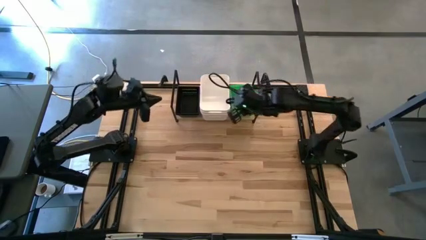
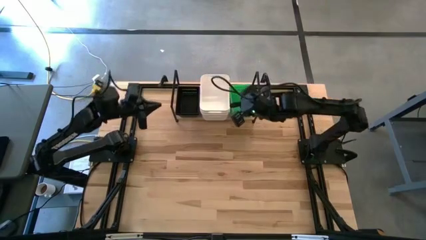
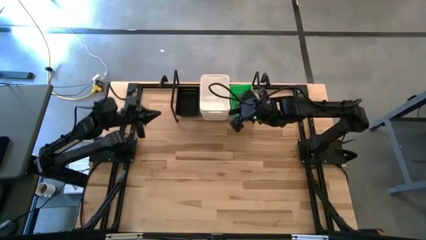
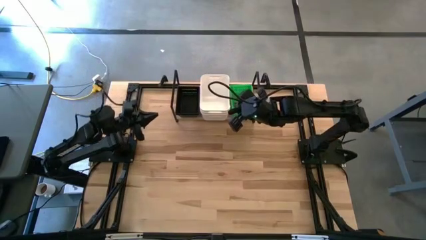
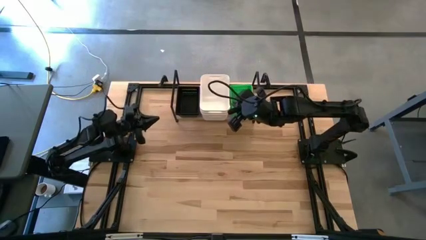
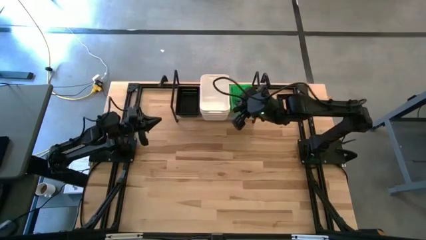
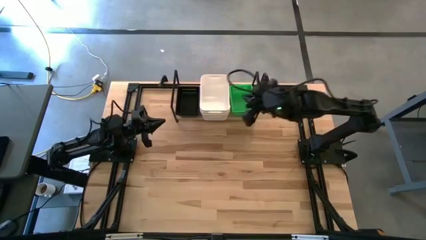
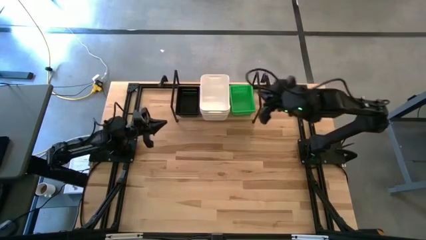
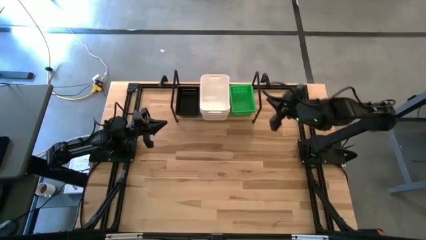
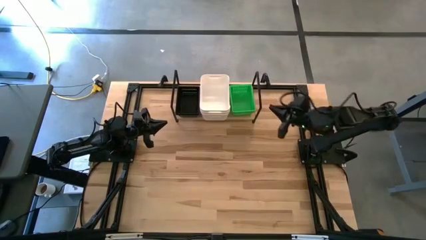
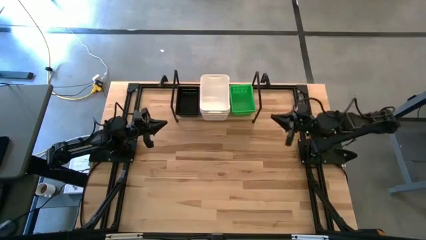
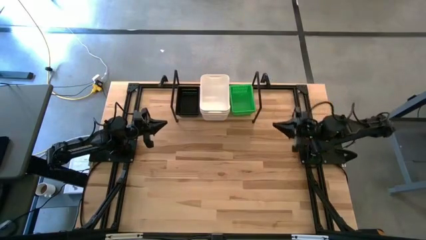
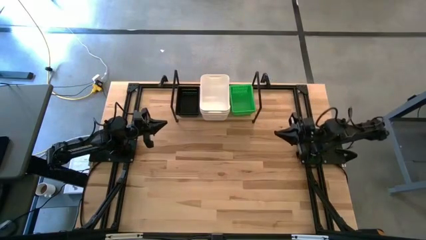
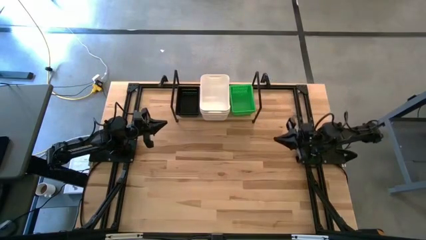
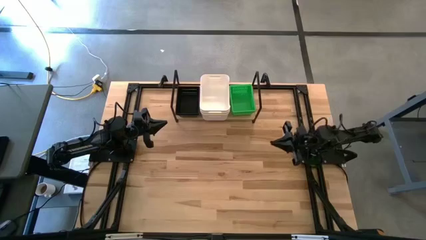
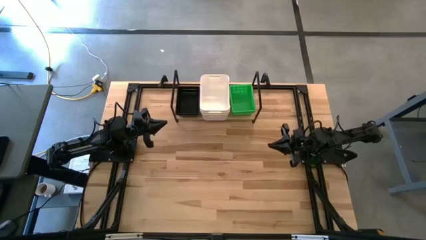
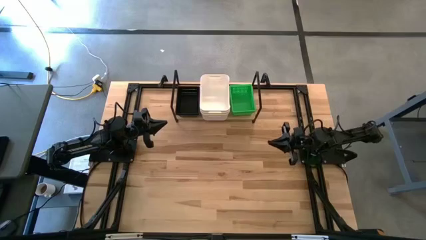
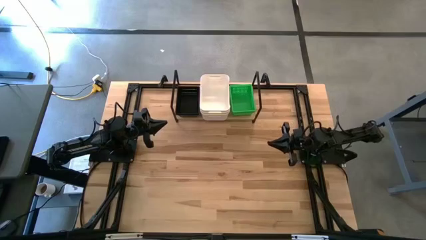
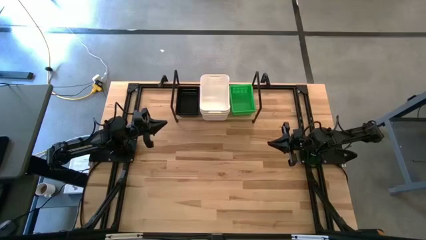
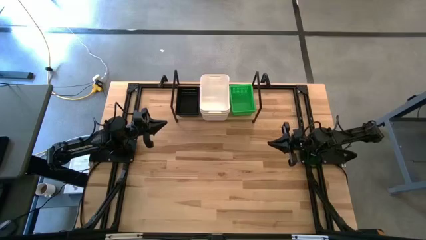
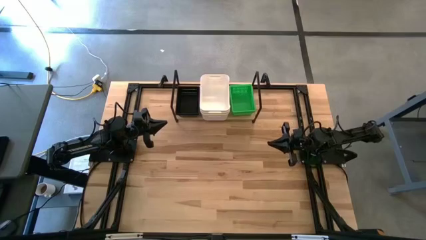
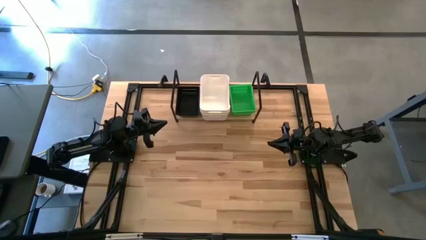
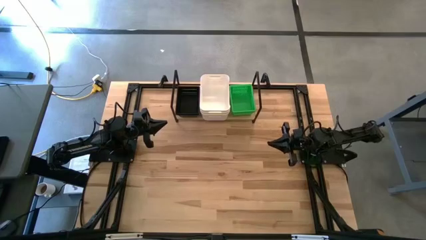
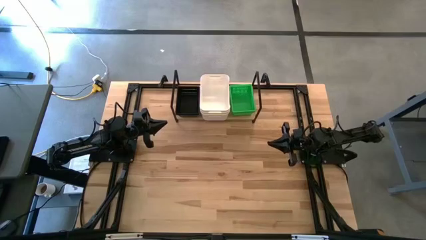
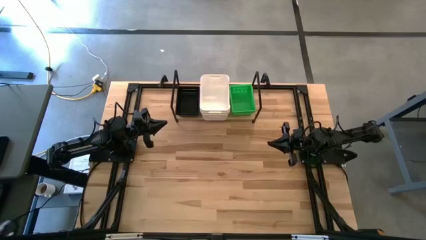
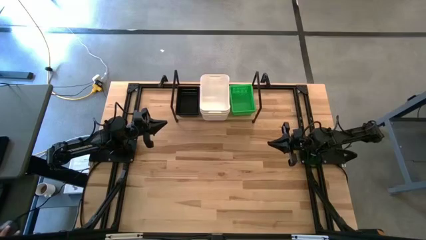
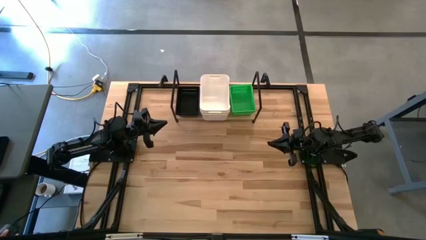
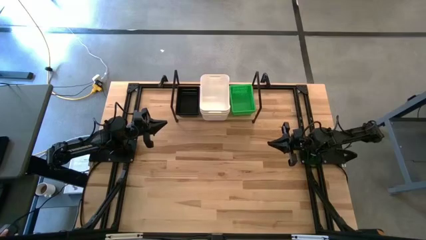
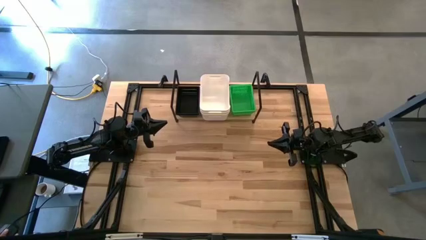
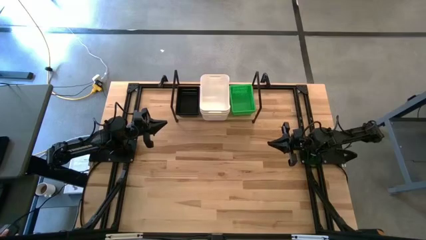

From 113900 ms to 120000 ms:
Task: Stack baskets on shelf by color
Return to Home Position

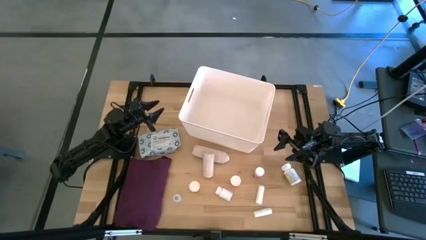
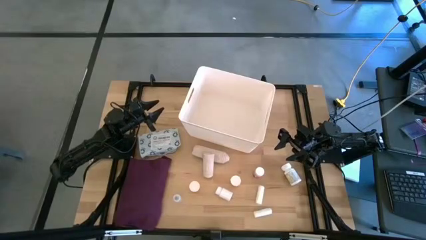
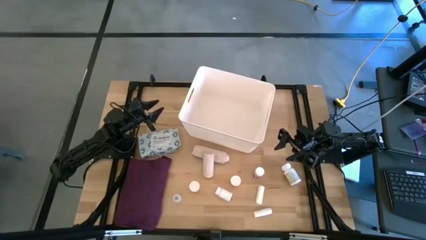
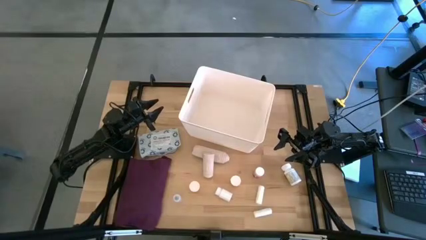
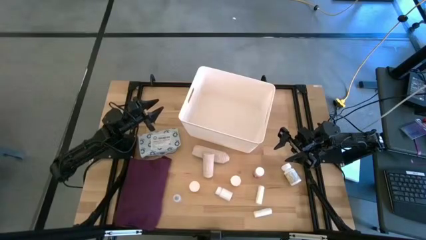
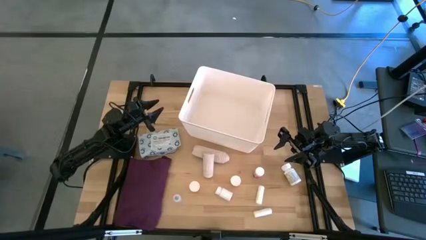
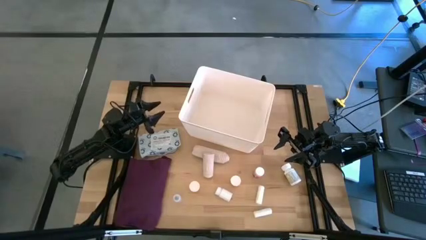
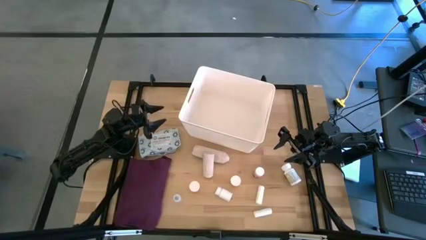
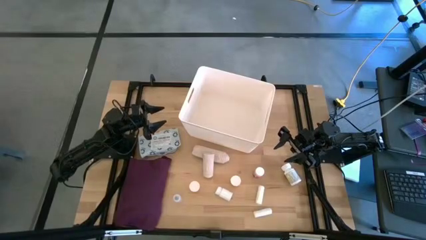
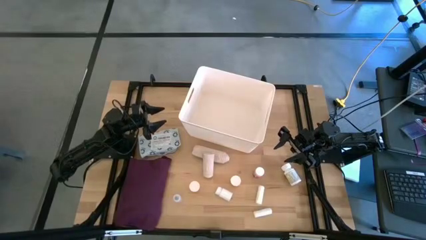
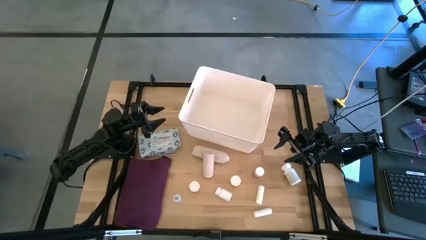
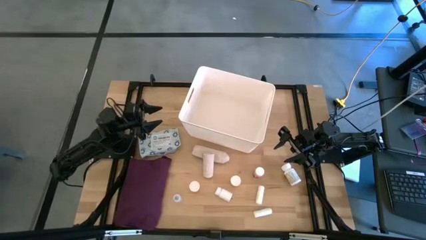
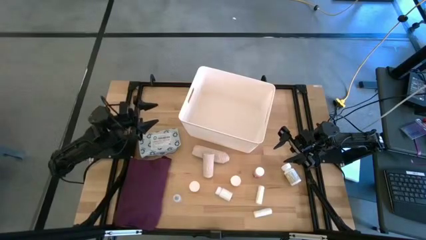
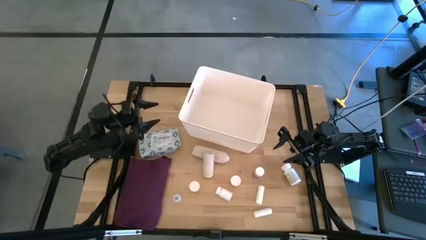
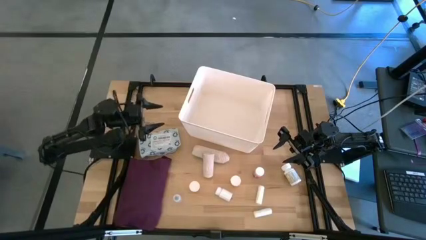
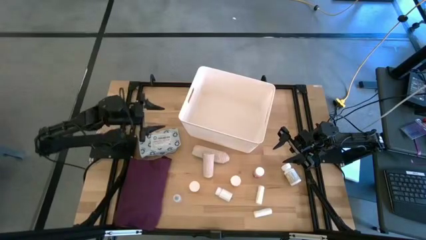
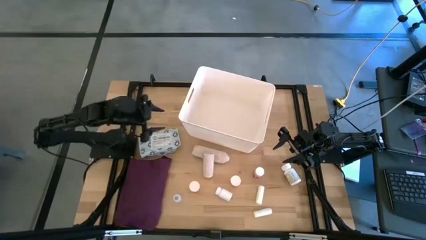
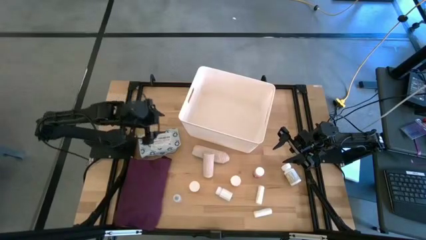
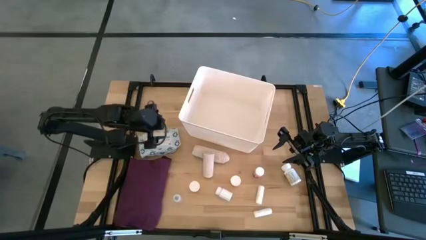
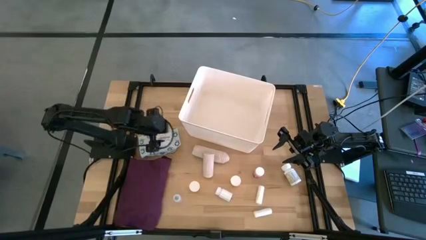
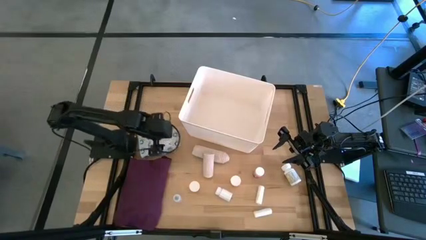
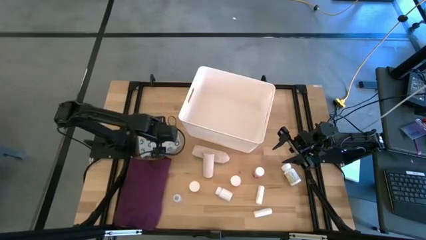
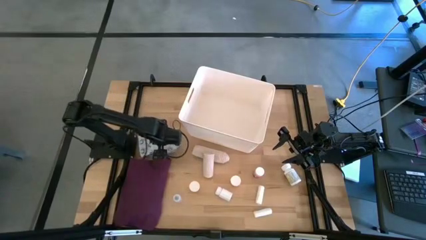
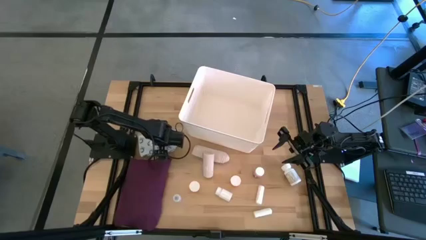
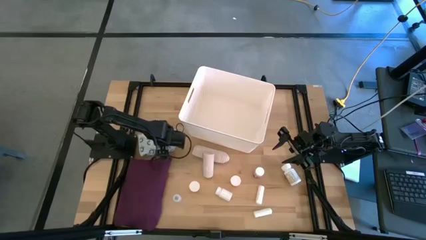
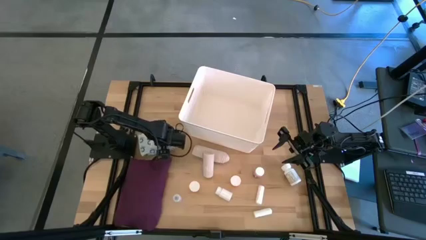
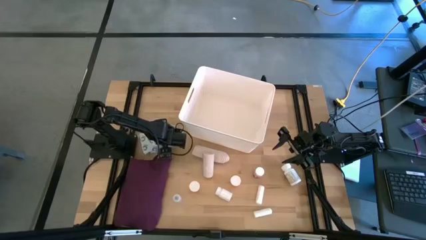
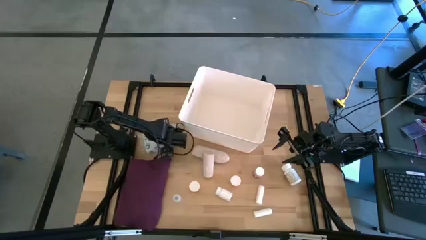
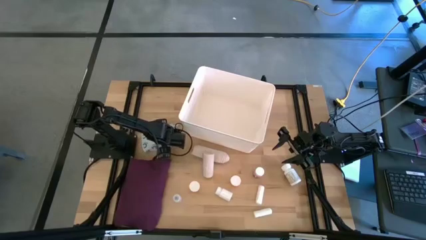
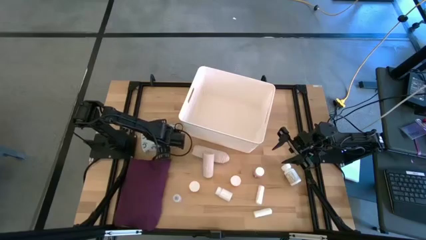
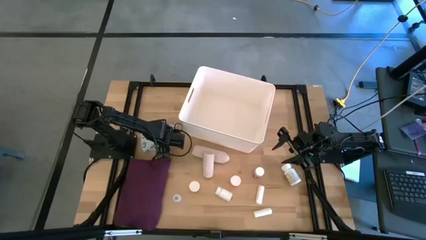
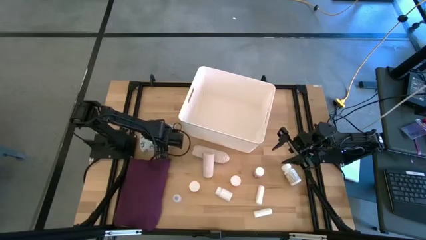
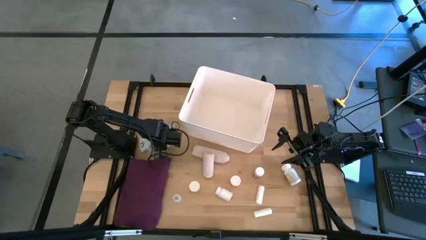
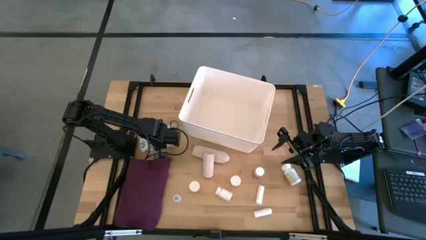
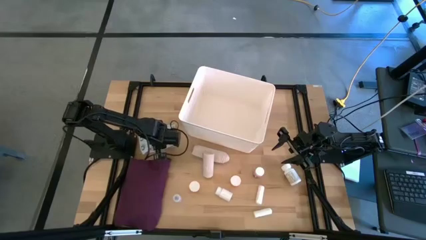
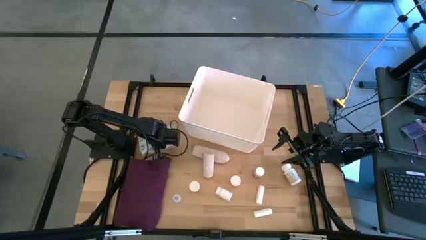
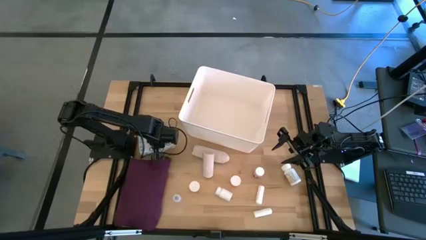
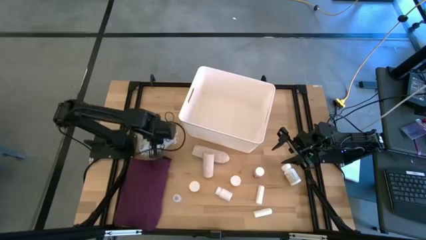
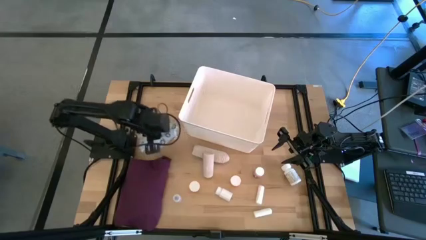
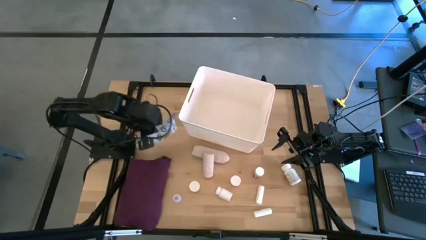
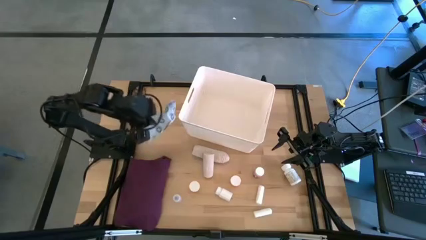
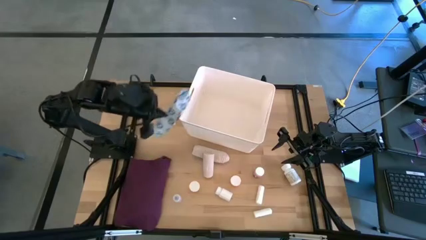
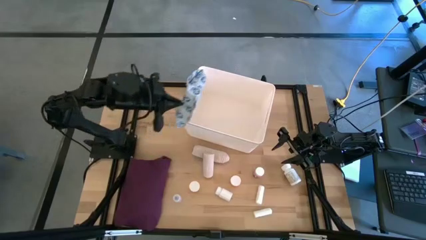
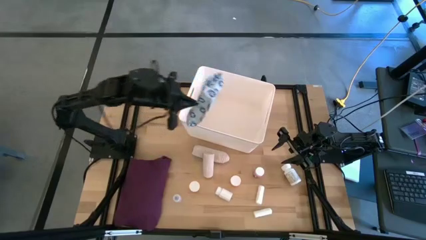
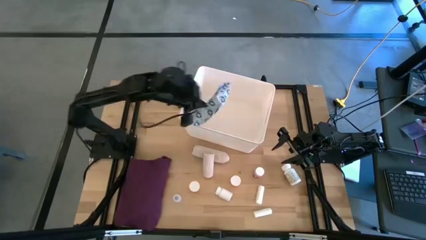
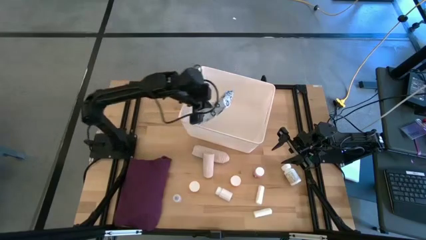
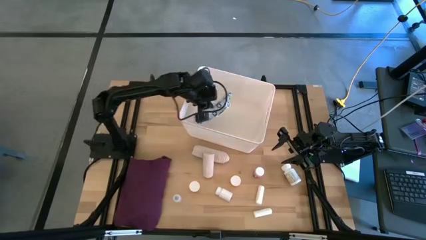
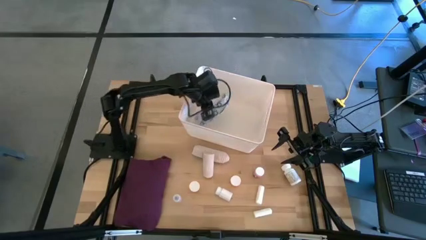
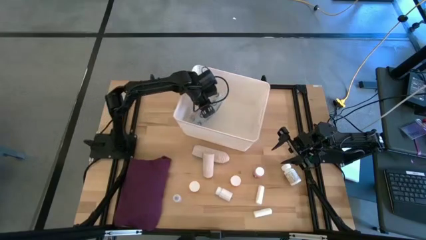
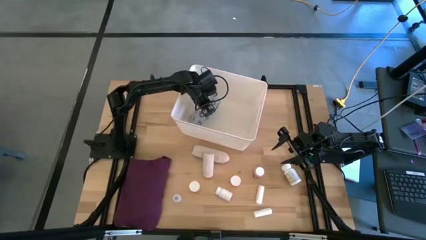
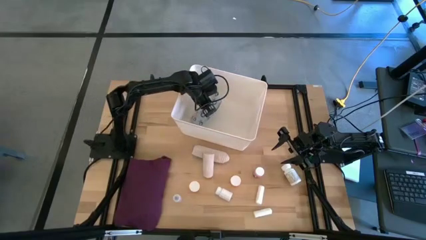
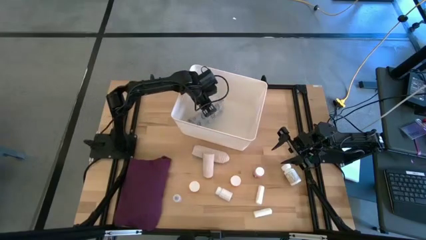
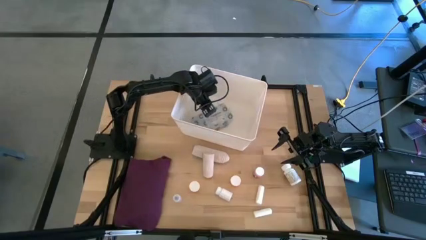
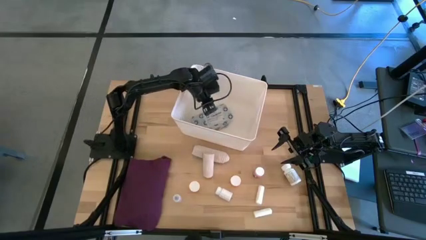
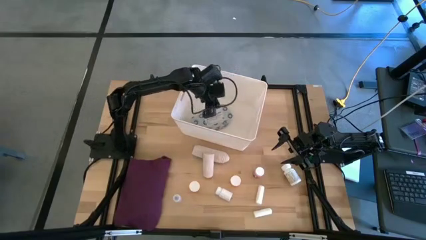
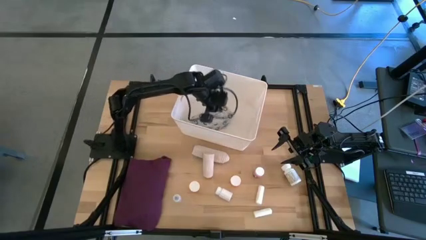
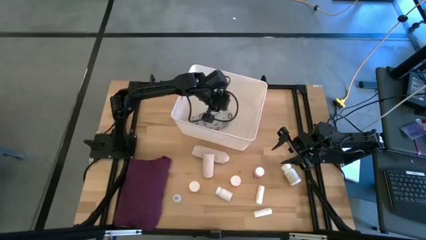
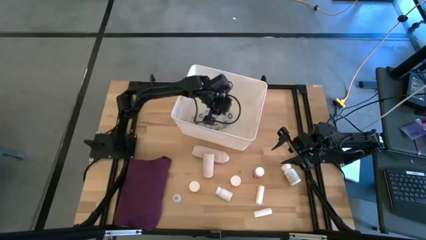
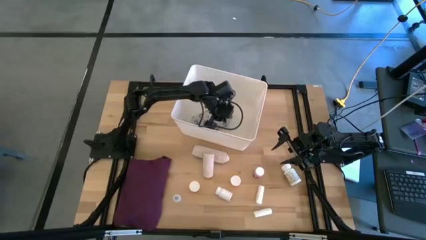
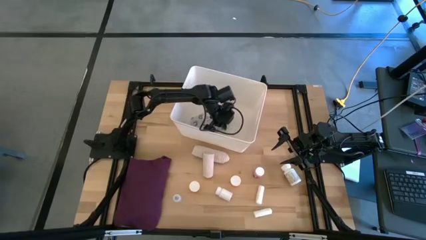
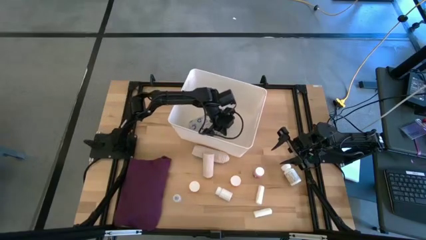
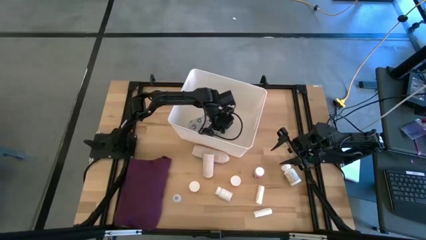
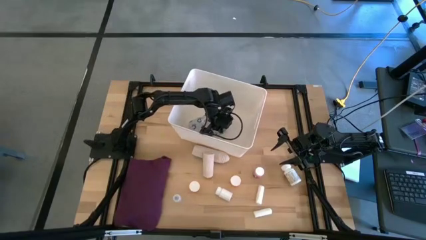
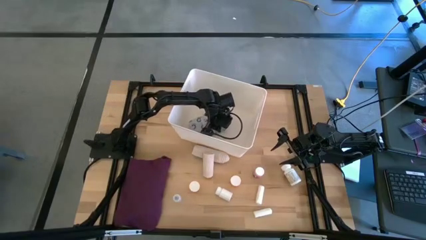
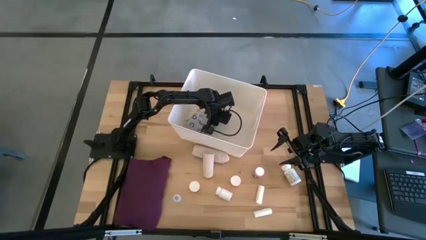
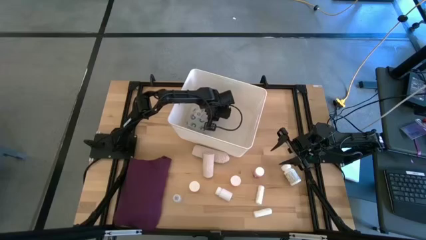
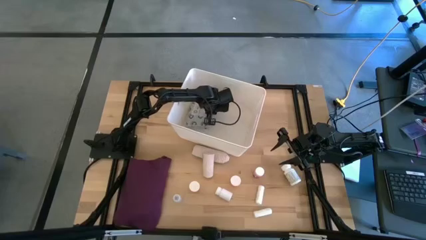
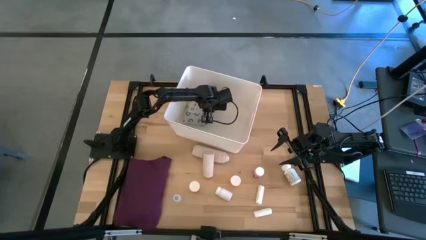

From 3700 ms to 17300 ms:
Task: Pick & place medical supplies in basket/bin
Put the blue mailer bag into the white bin
